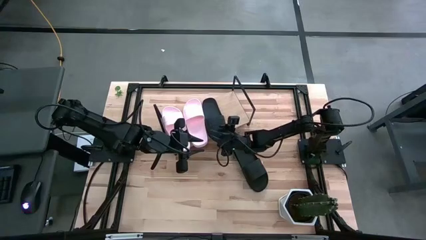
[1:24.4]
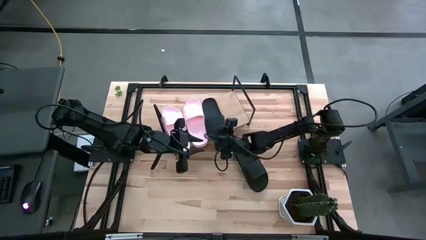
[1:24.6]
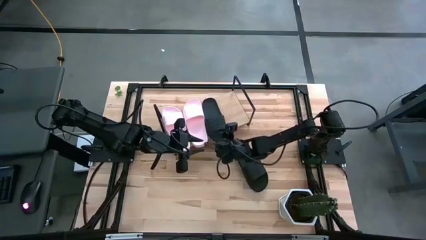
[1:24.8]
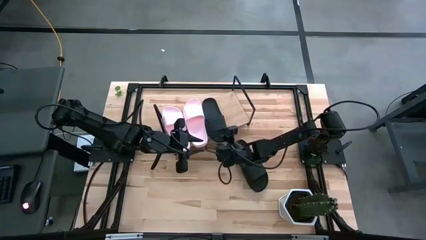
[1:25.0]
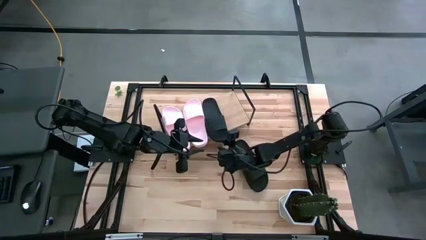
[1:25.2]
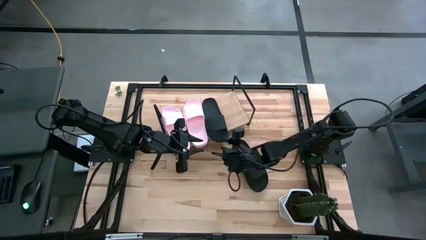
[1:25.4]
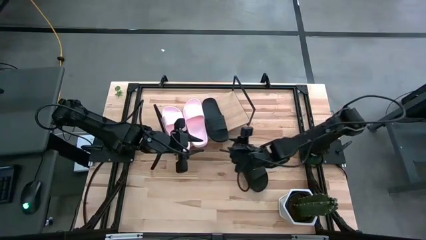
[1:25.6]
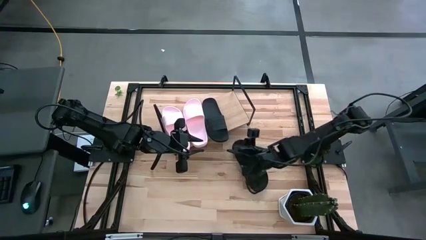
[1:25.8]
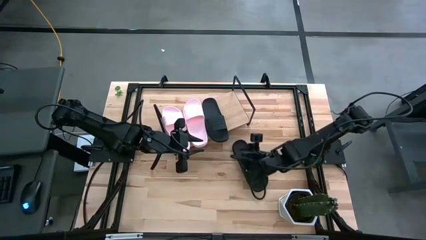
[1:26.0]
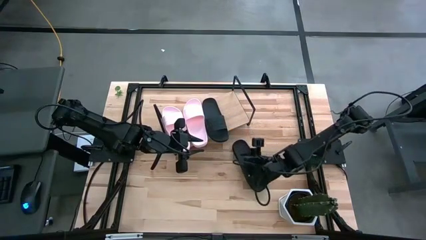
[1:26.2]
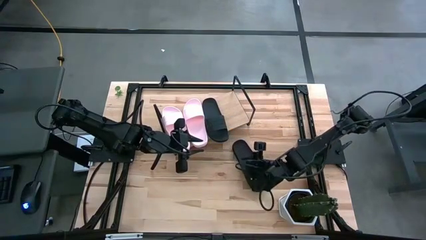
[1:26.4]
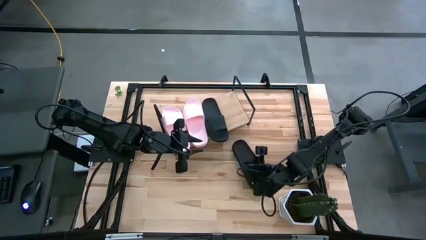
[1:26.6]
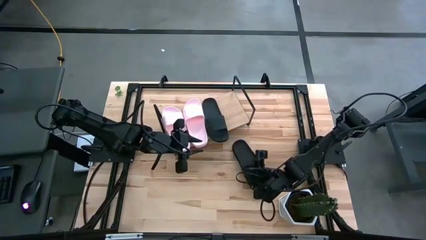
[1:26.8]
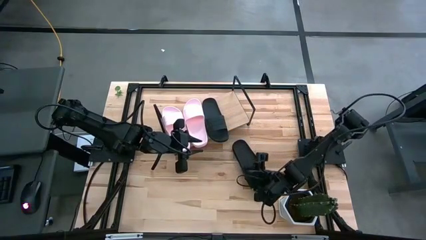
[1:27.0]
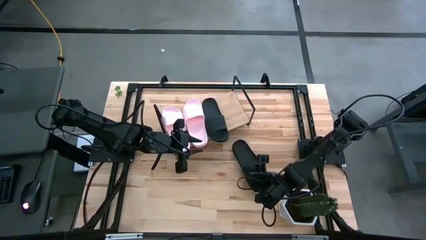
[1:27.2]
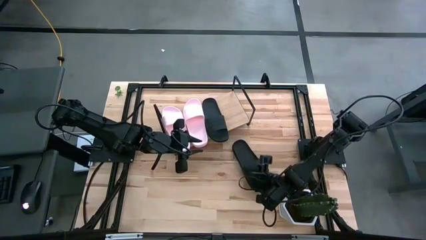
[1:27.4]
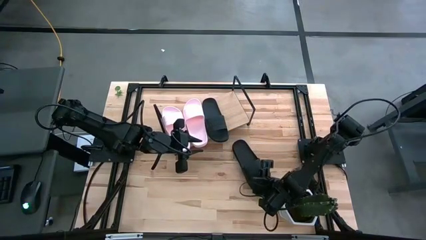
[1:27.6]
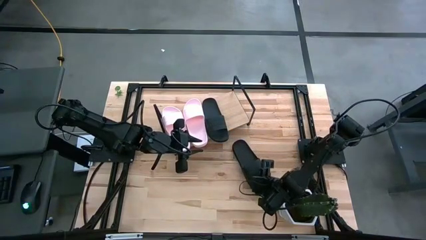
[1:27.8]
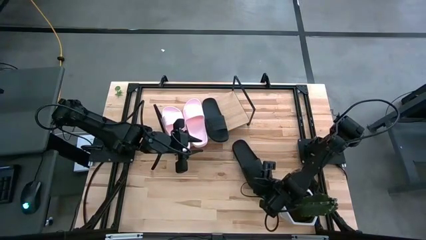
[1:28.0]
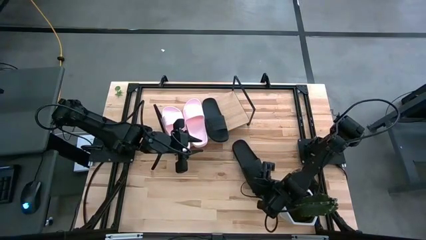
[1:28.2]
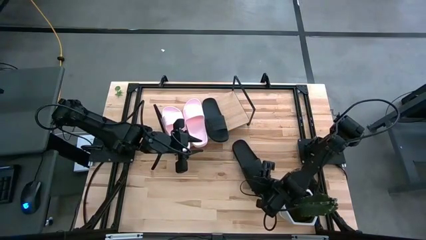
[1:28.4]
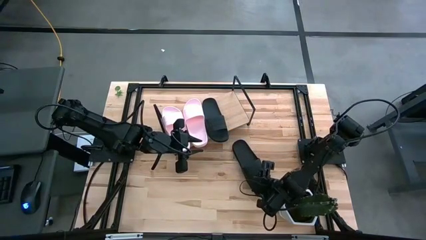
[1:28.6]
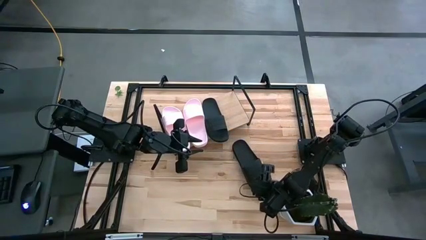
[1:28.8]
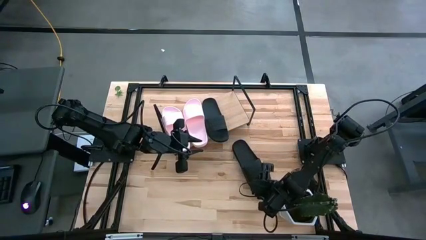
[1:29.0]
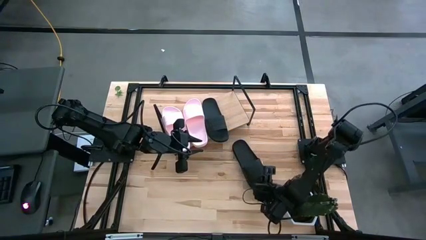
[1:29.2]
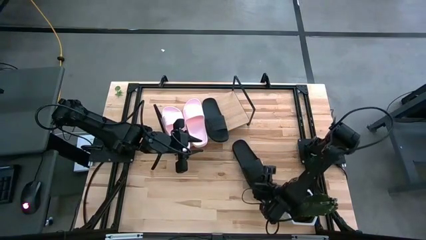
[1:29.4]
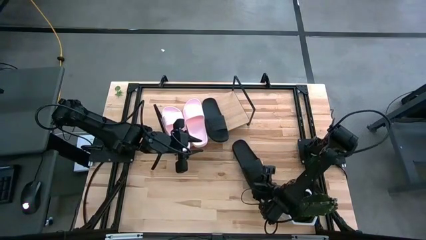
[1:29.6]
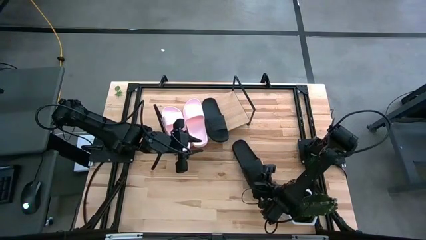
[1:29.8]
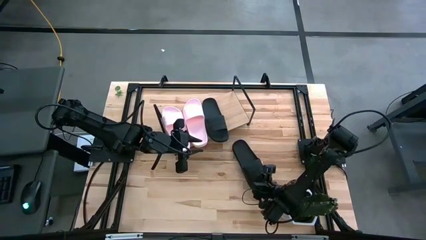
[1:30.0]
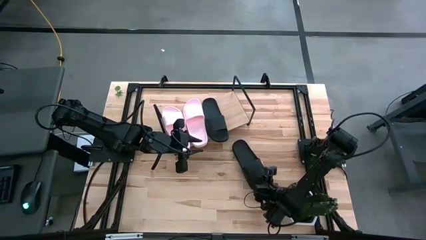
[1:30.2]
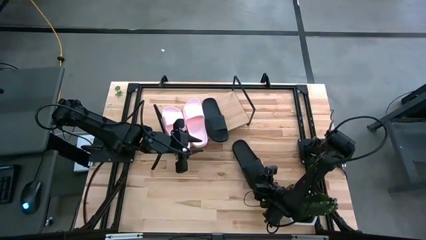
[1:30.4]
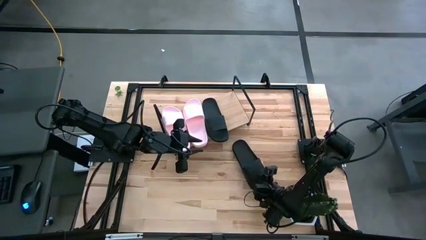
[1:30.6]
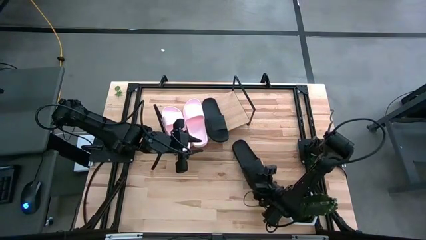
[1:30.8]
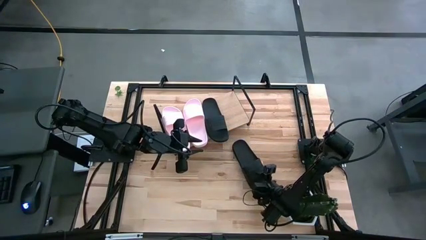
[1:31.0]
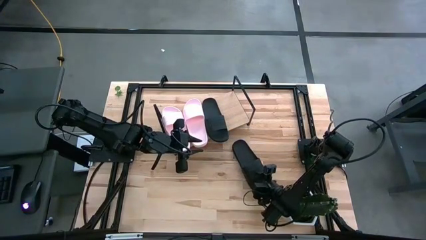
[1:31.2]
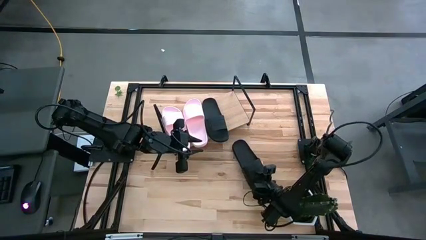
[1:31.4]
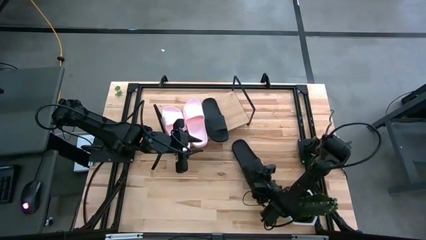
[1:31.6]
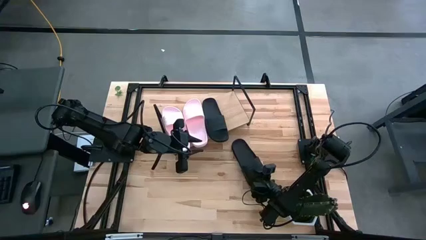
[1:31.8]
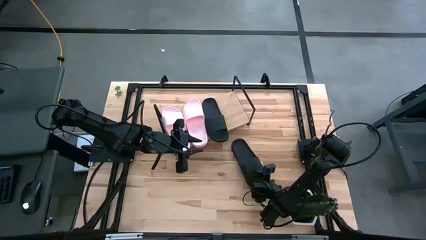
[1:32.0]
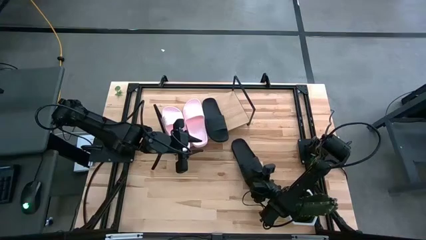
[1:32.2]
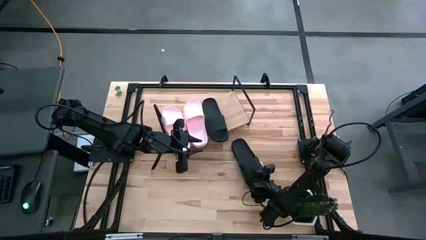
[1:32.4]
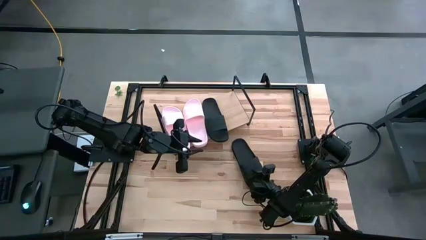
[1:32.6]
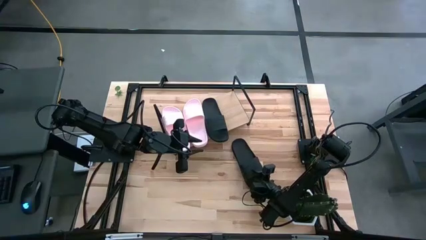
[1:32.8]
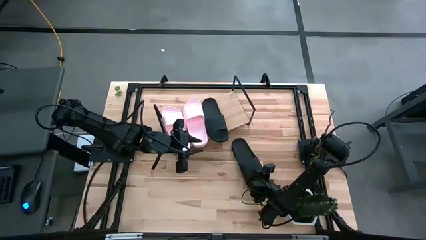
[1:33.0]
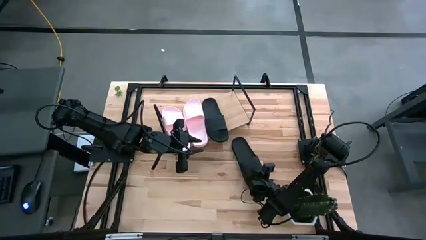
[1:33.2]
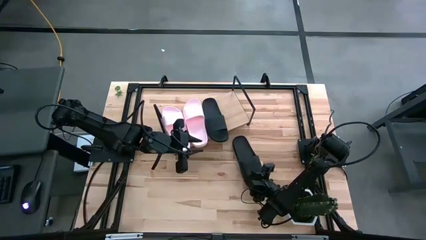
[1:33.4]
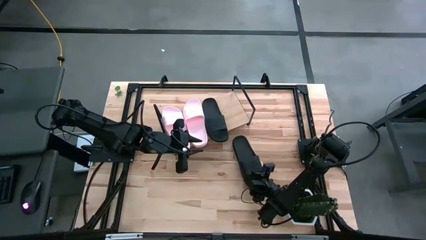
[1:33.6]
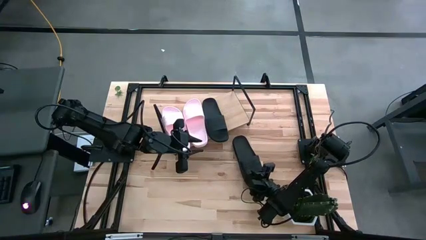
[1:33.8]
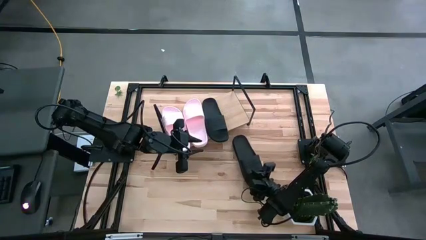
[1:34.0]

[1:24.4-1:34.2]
Task: Pick and place slides into the shelf
Put the black slide on the shelf
